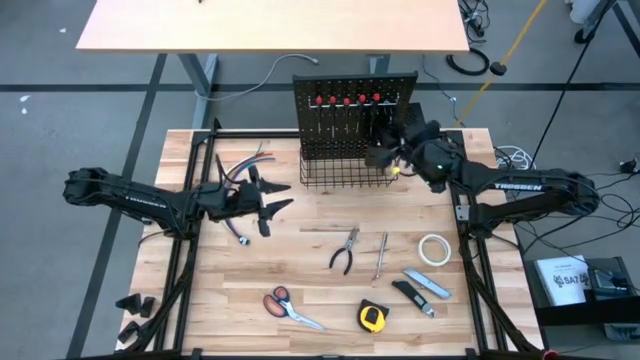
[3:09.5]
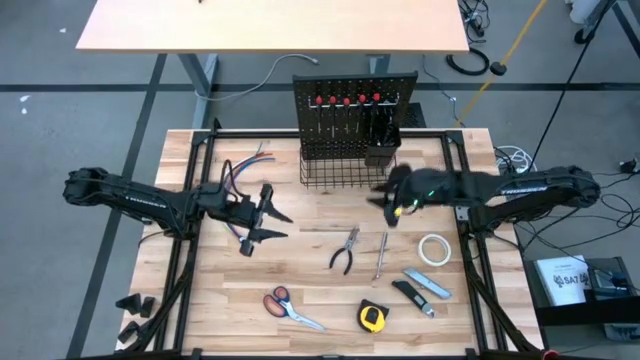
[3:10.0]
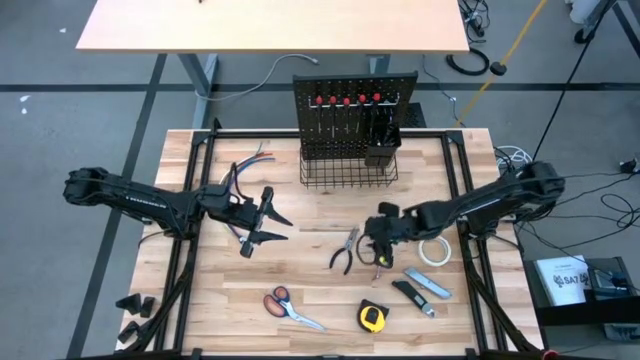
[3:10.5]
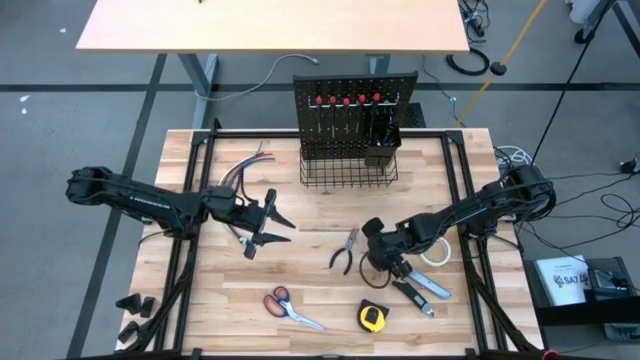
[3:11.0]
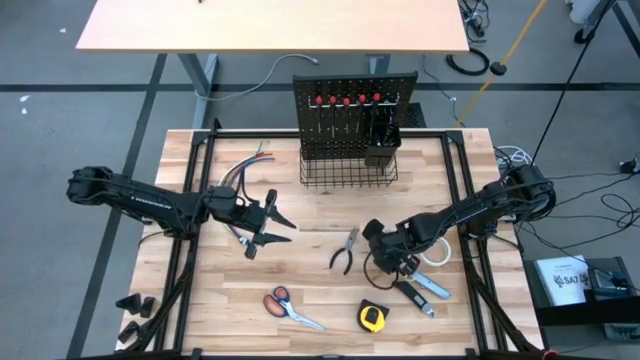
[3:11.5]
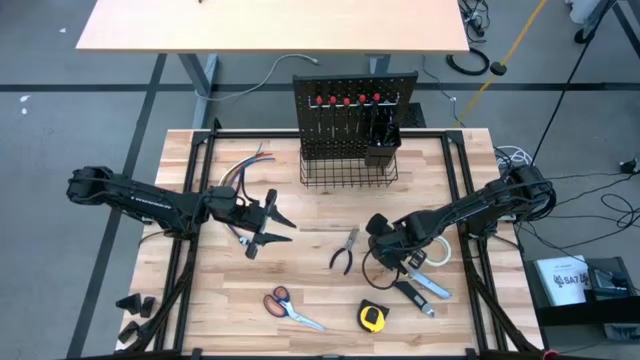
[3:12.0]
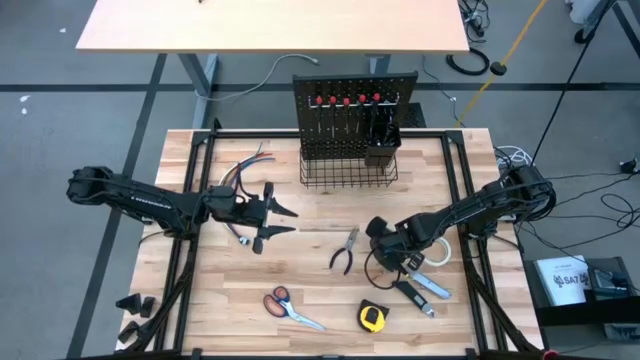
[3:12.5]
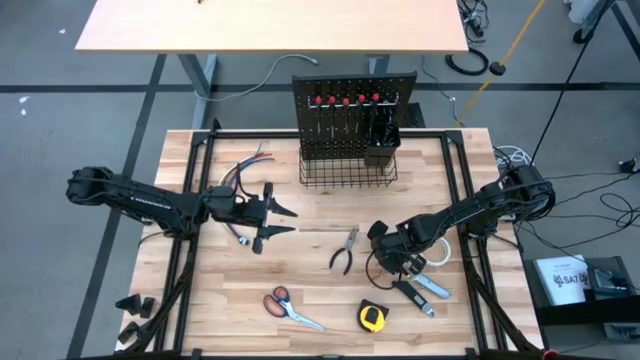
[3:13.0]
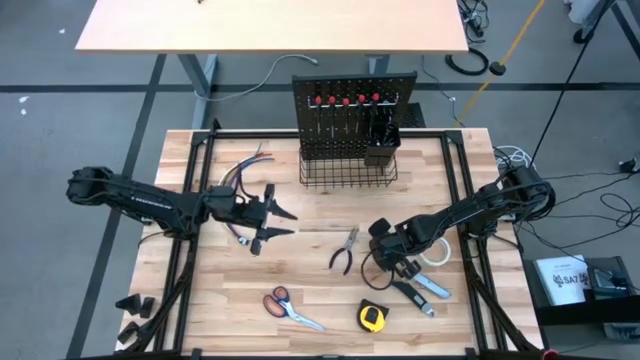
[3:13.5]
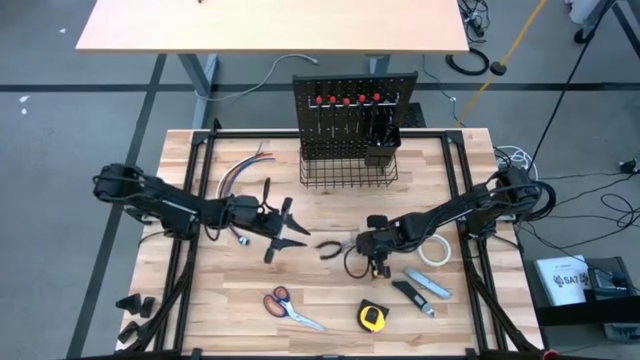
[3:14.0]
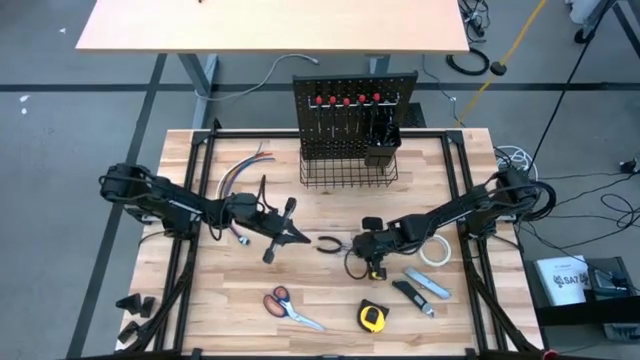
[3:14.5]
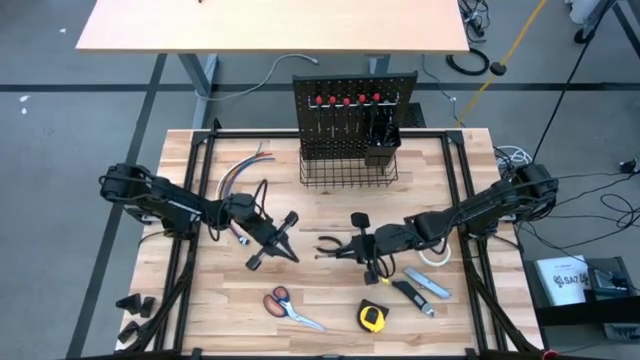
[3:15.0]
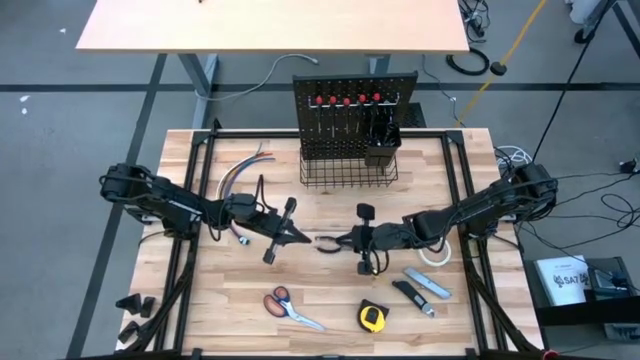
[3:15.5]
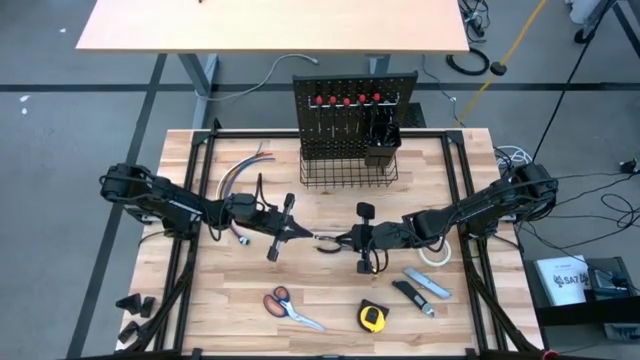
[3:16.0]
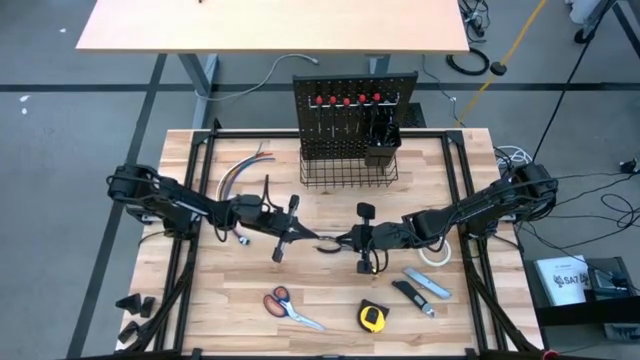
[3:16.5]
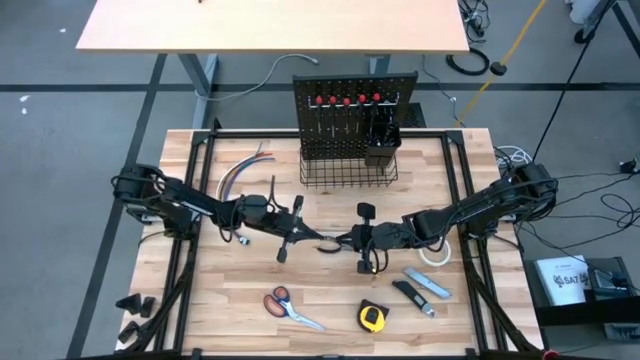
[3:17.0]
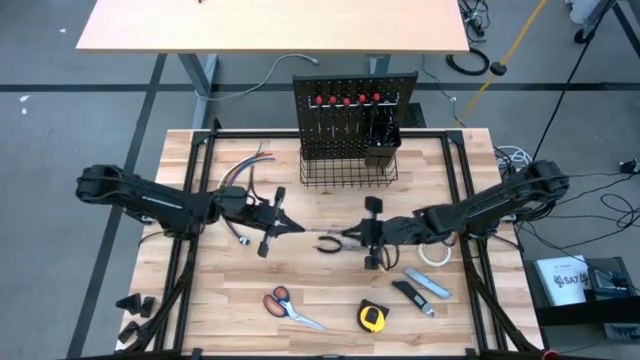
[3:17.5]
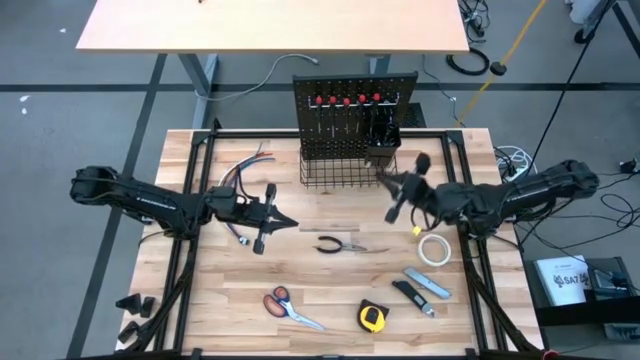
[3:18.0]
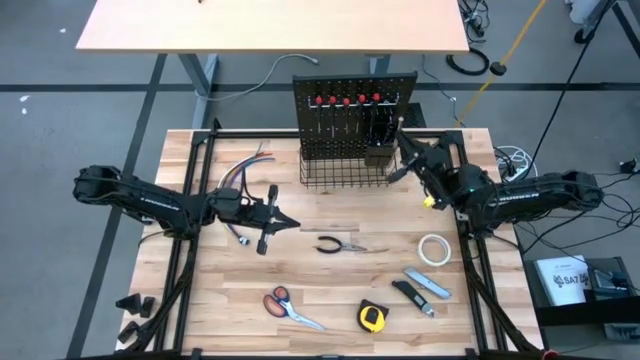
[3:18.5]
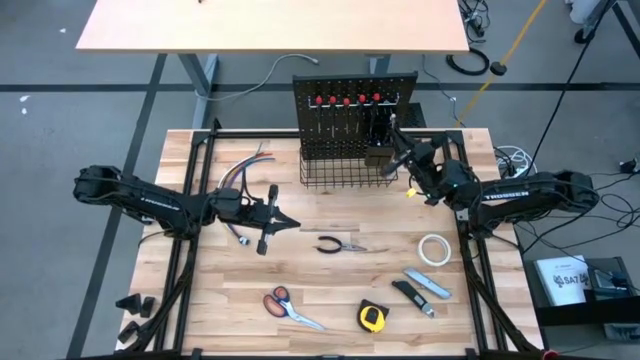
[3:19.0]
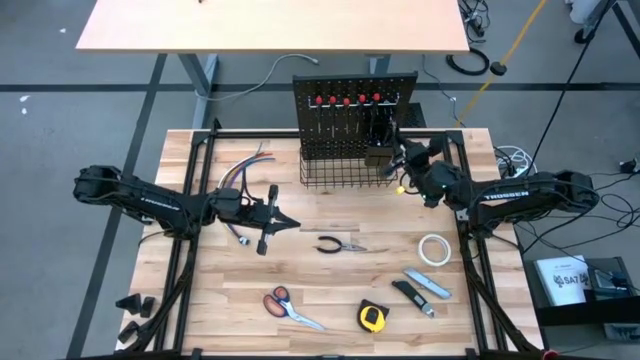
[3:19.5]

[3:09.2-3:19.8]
Task: Hang tools onto peg board
Put the telescopic into the black bin on the pegboard

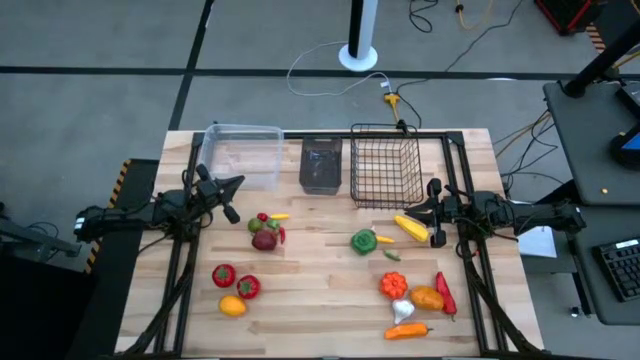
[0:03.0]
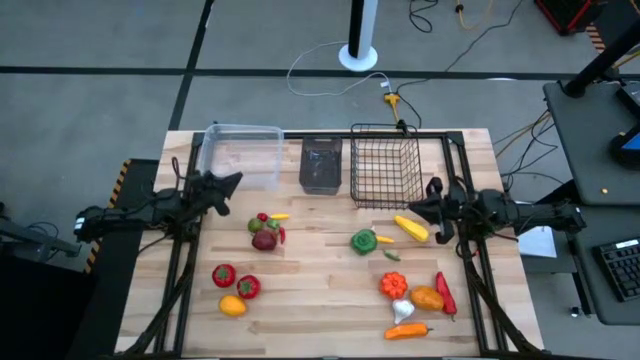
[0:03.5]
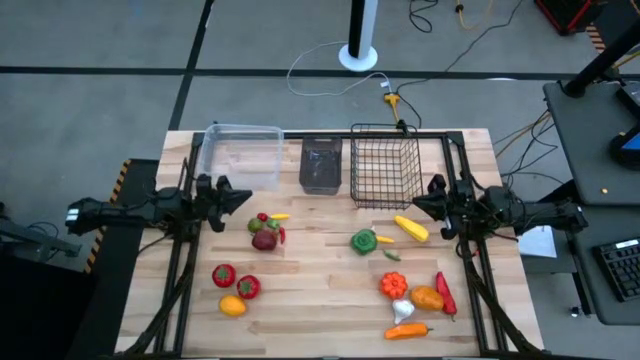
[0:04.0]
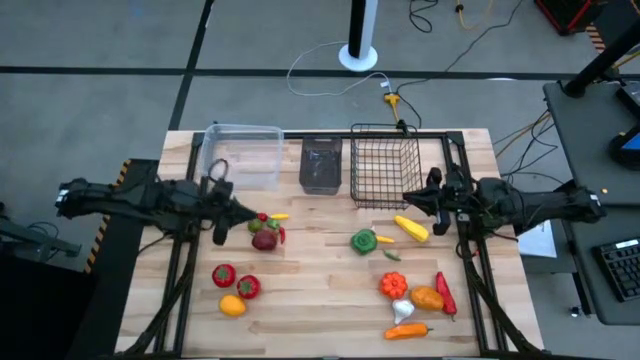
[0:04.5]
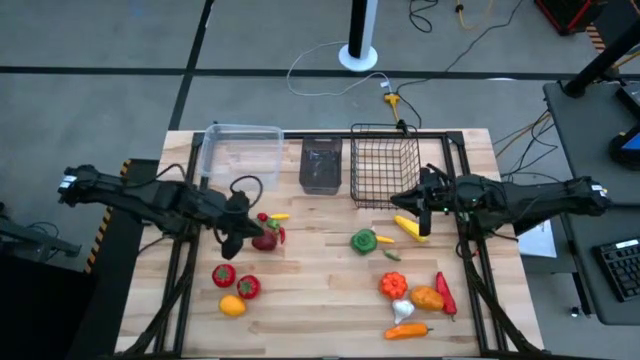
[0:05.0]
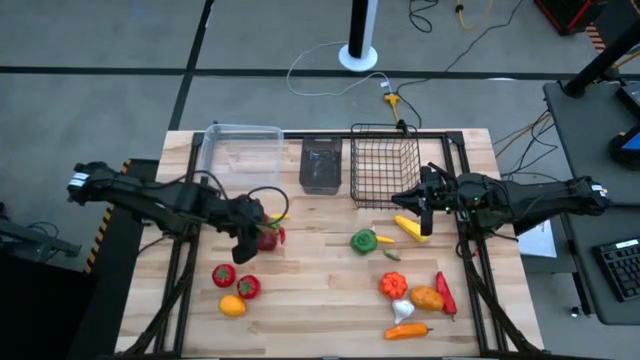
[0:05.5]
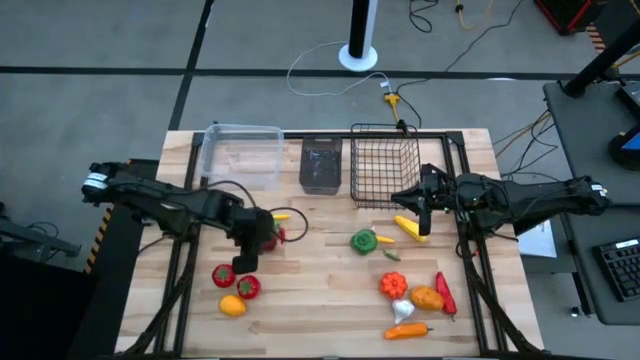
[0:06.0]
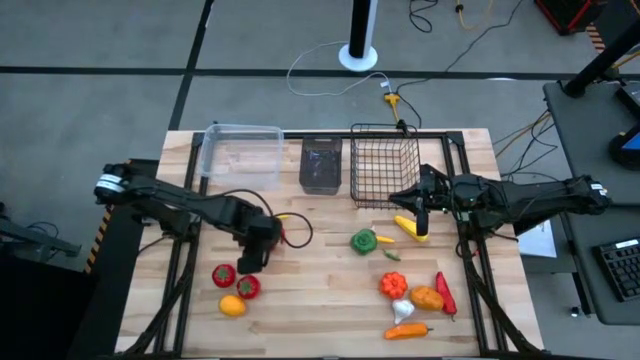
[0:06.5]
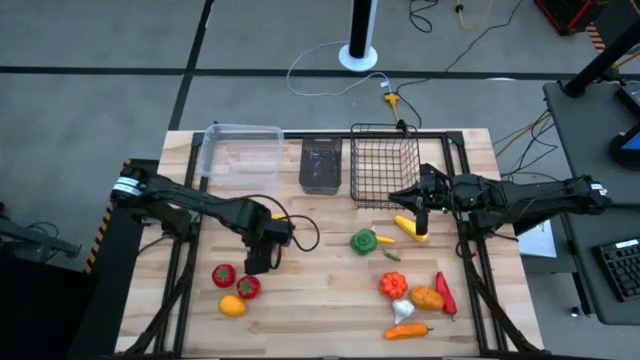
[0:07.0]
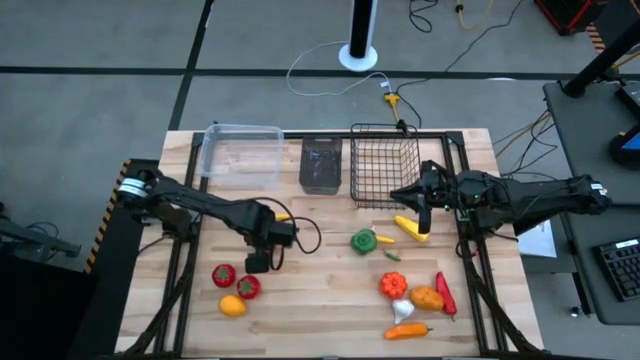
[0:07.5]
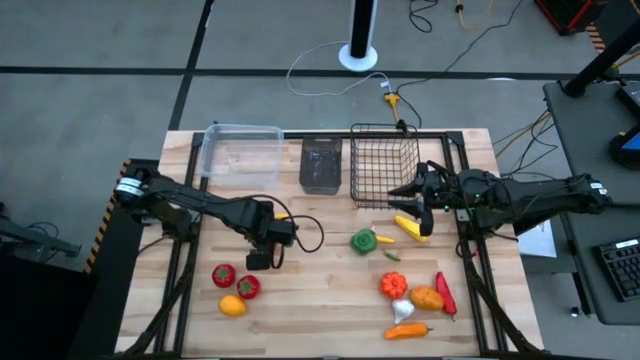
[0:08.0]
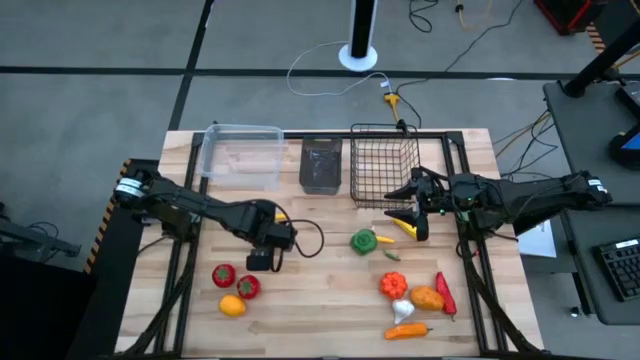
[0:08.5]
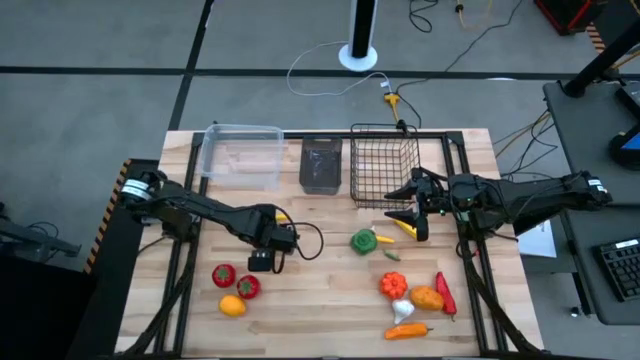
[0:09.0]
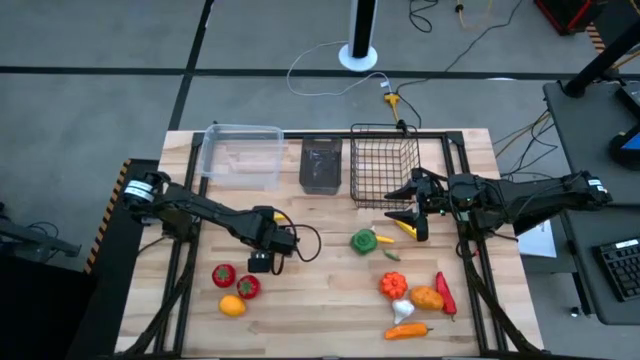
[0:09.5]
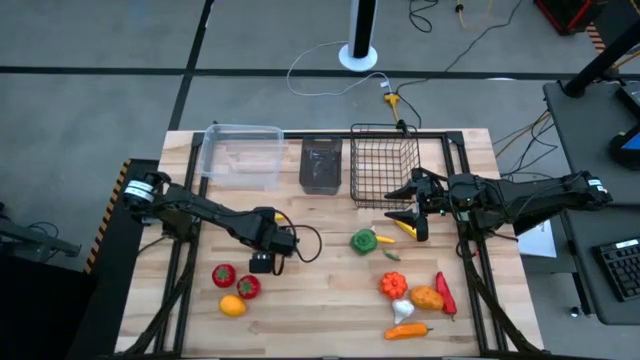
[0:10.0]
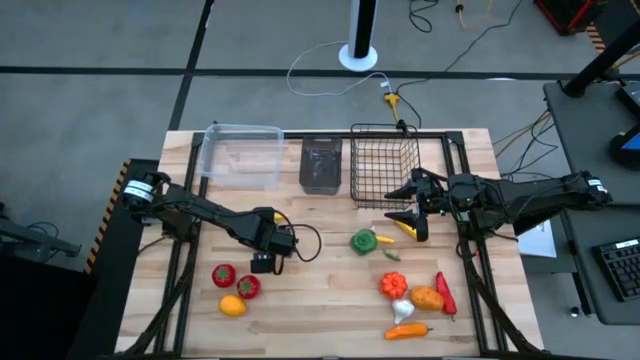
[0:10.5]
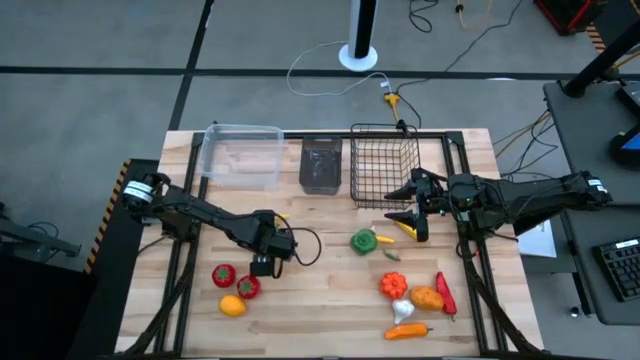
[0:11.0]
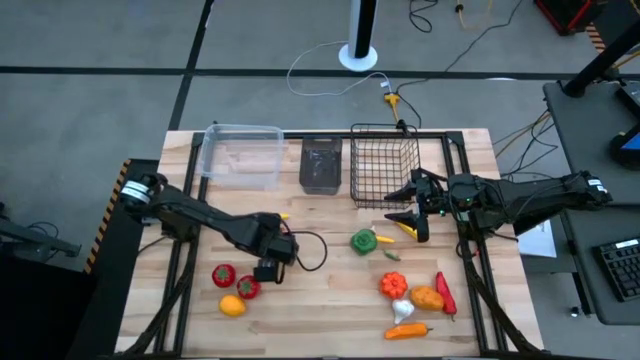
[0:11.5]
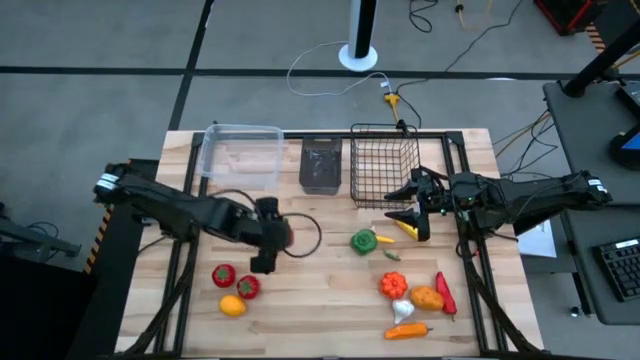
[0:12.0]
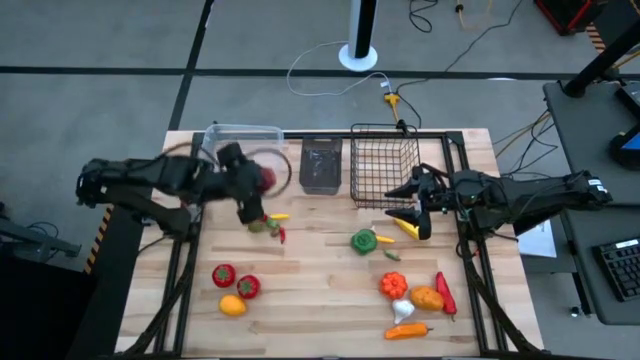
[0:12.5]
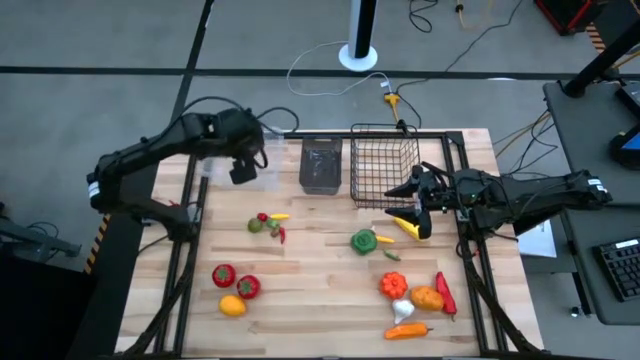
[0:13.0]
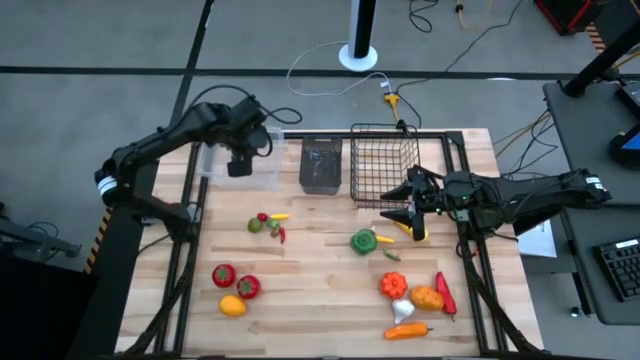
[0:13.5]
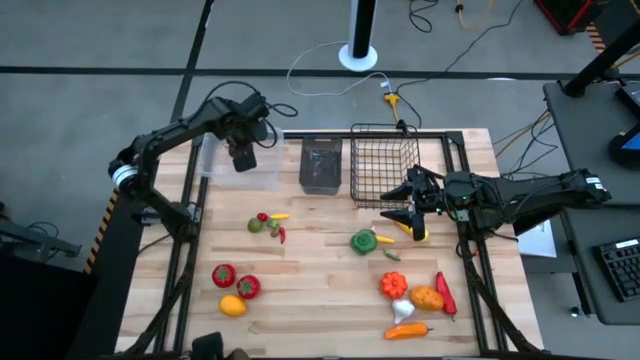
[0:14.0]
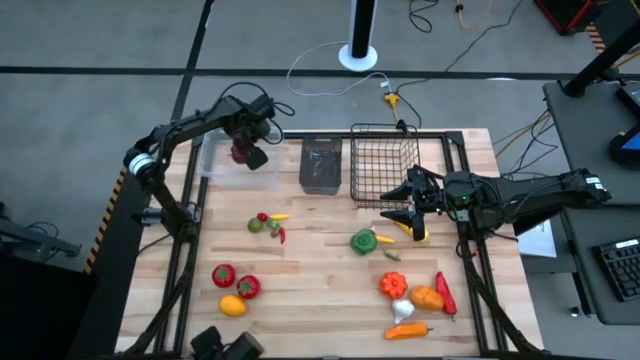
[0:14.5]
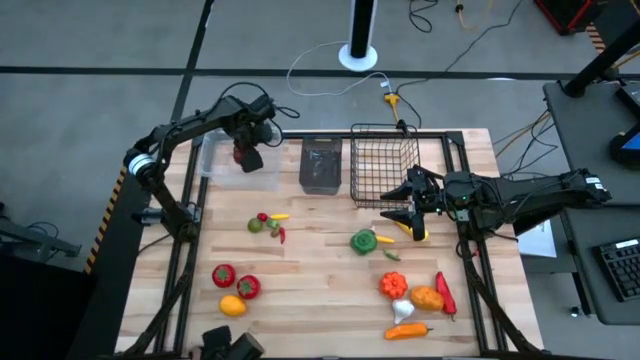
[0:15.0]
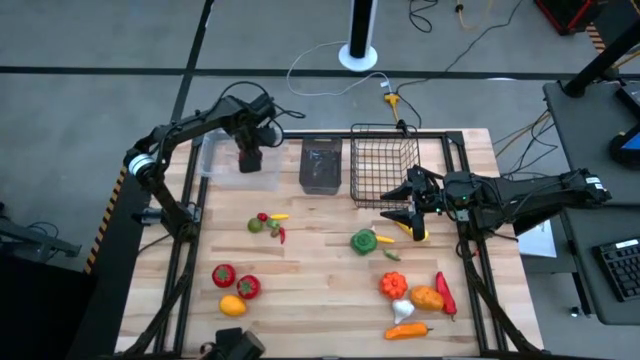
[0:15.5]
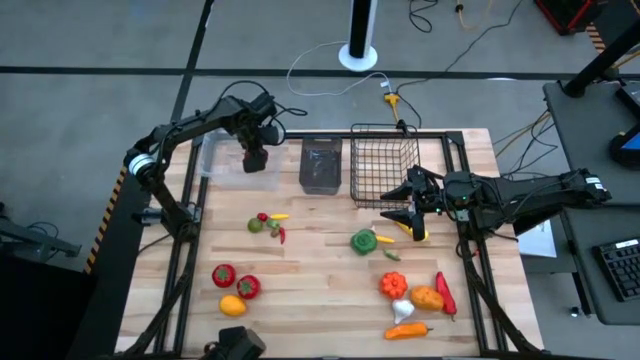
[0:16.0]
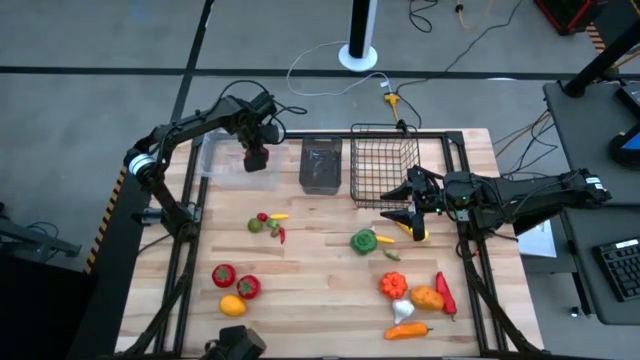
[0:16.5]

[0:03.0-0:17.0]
Task: Sort produce into baskets
Put the red apple into the transparent bin
